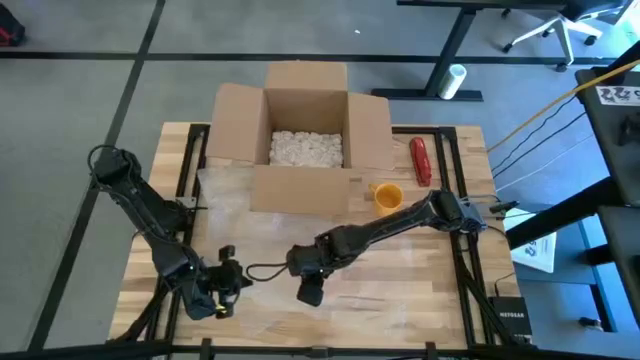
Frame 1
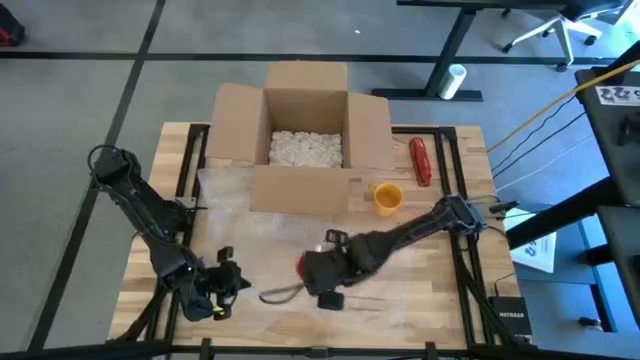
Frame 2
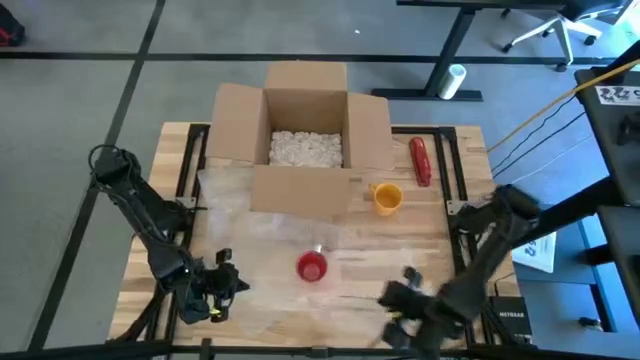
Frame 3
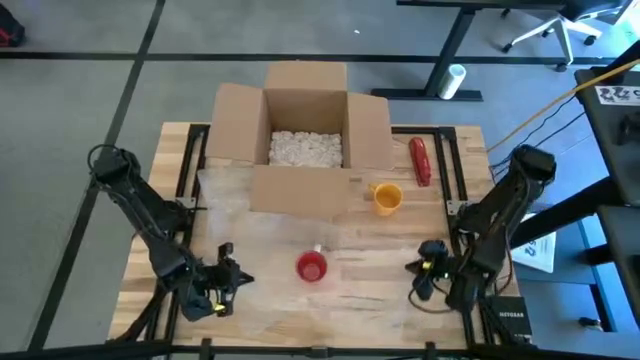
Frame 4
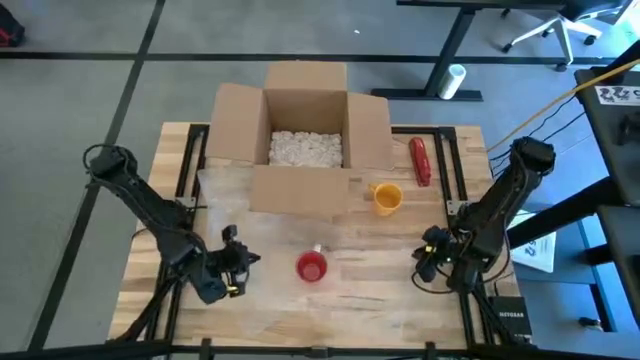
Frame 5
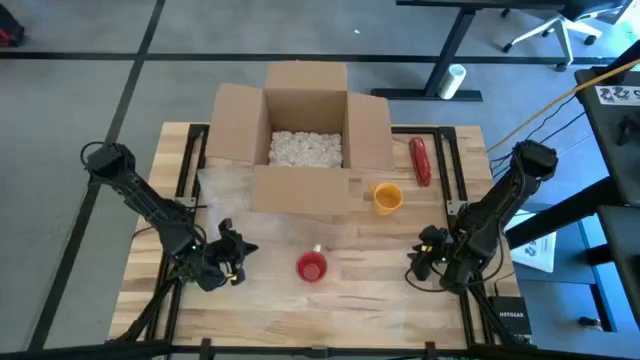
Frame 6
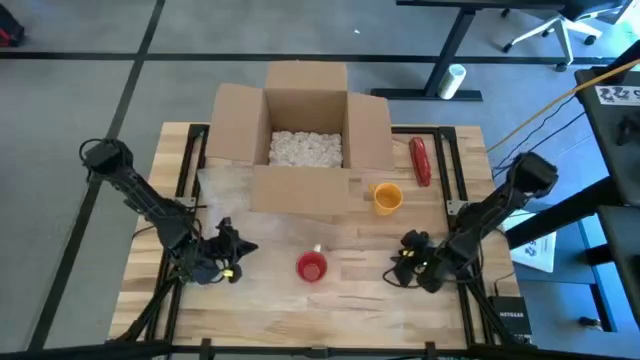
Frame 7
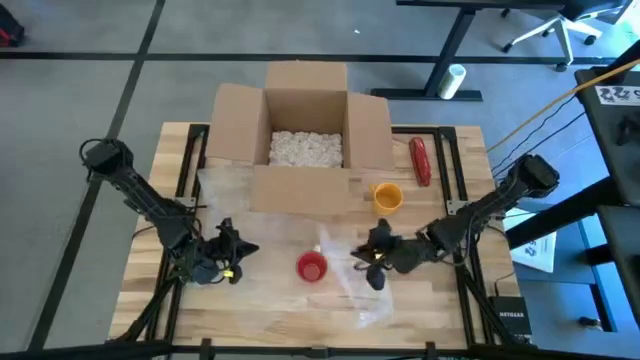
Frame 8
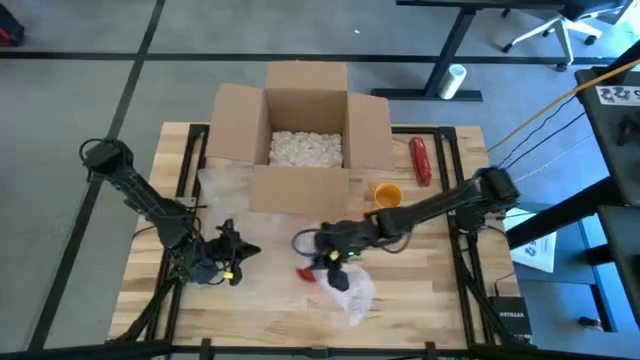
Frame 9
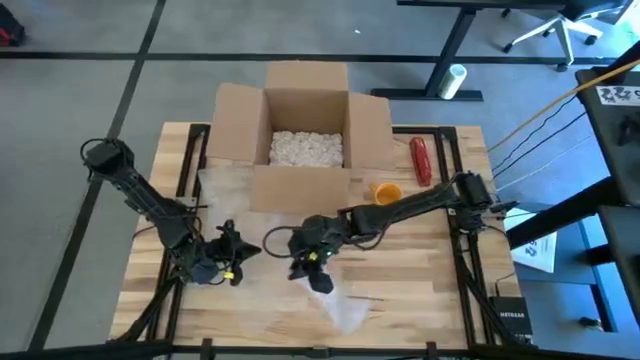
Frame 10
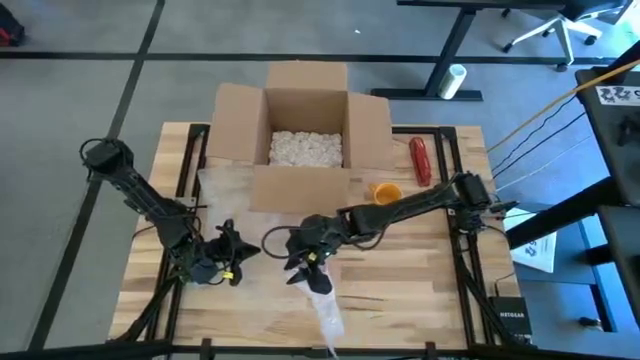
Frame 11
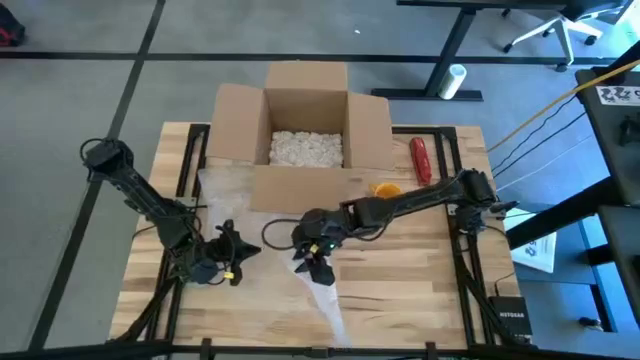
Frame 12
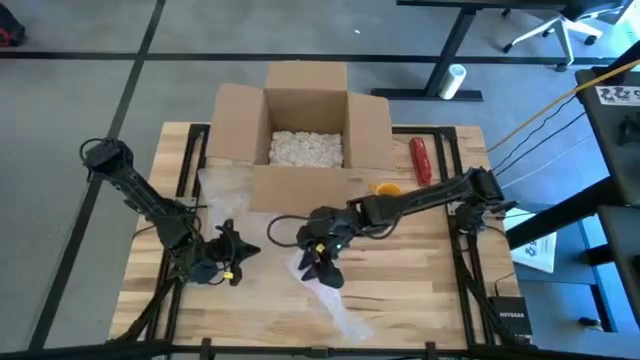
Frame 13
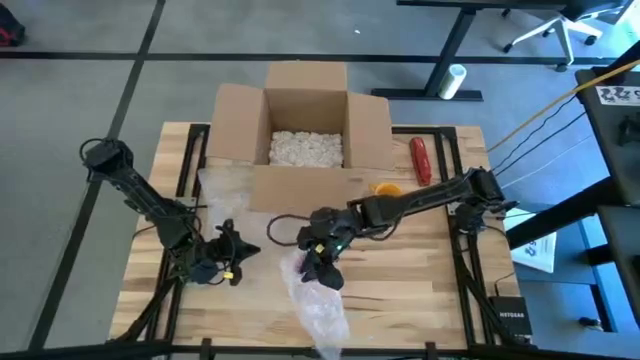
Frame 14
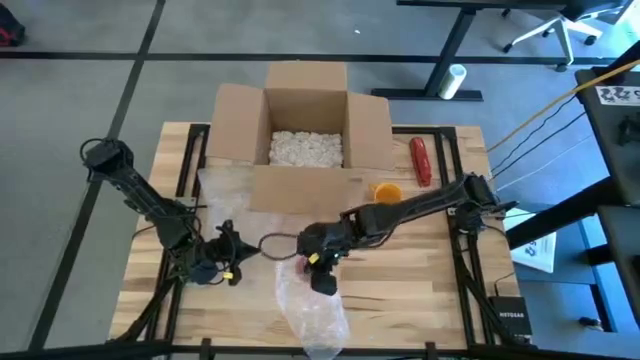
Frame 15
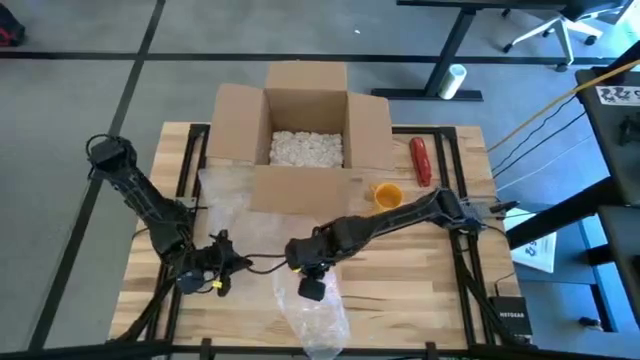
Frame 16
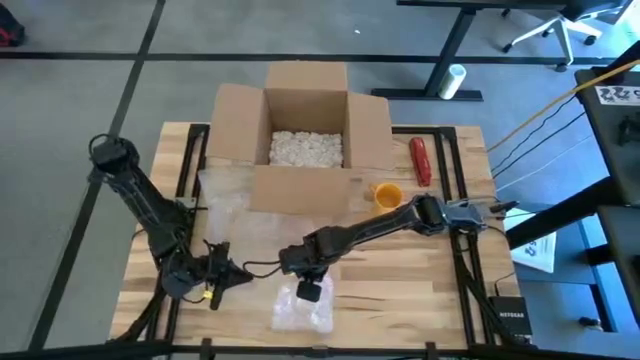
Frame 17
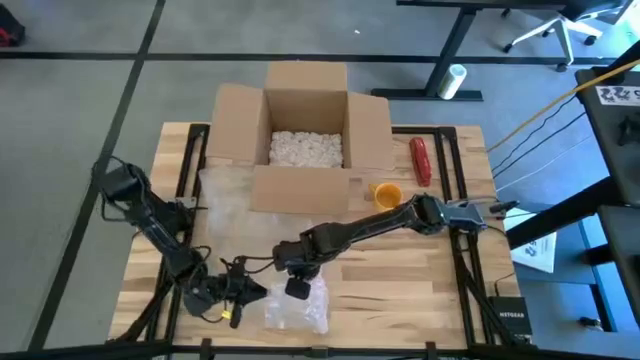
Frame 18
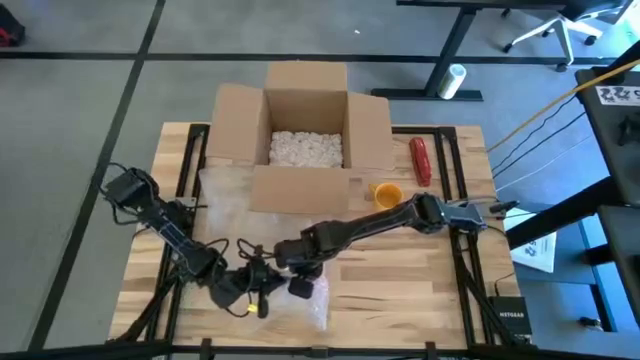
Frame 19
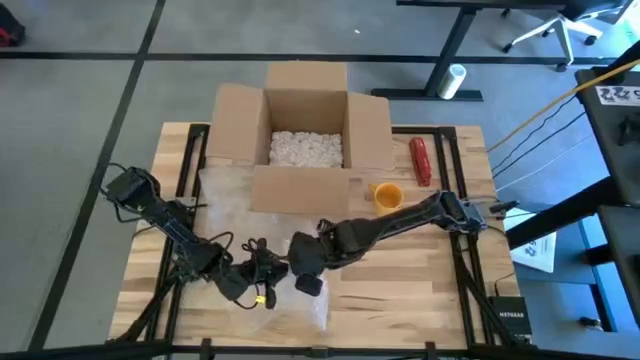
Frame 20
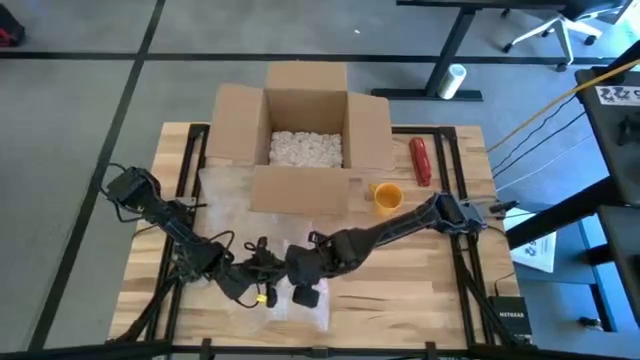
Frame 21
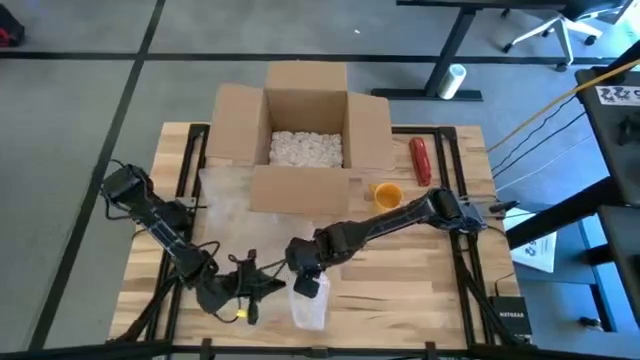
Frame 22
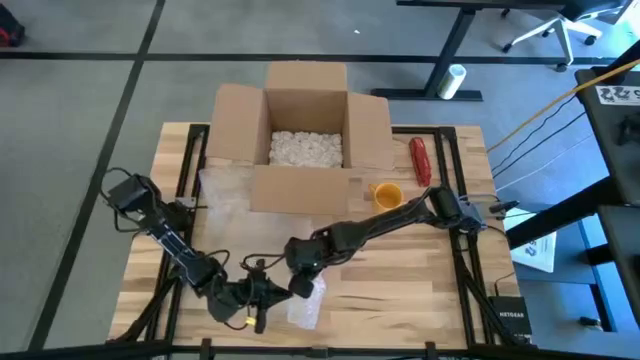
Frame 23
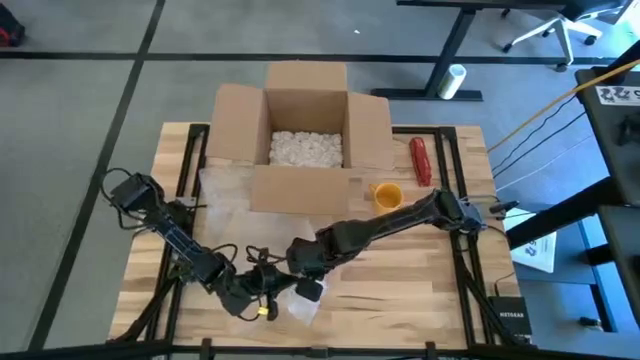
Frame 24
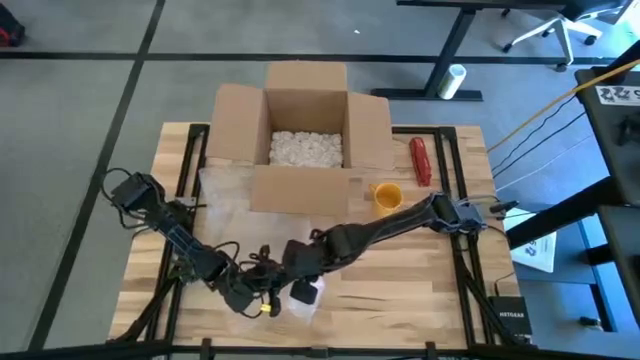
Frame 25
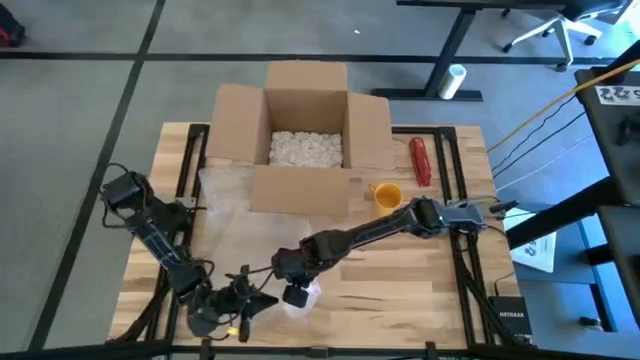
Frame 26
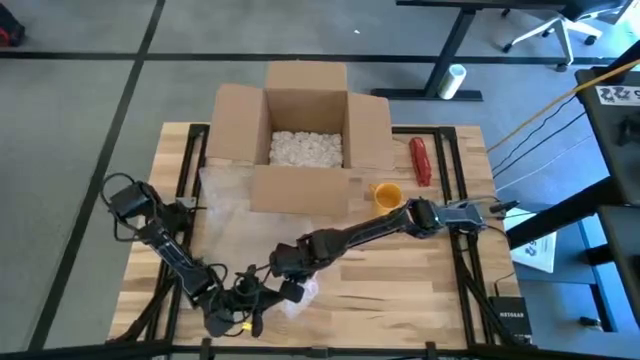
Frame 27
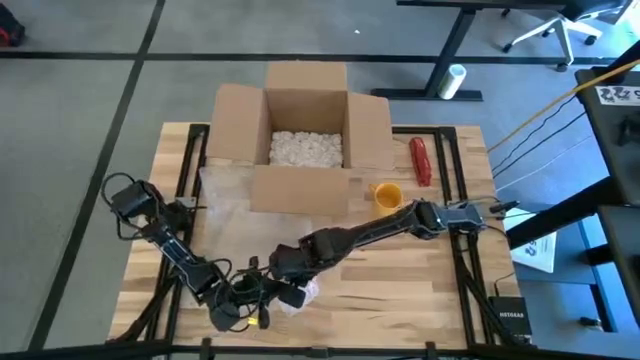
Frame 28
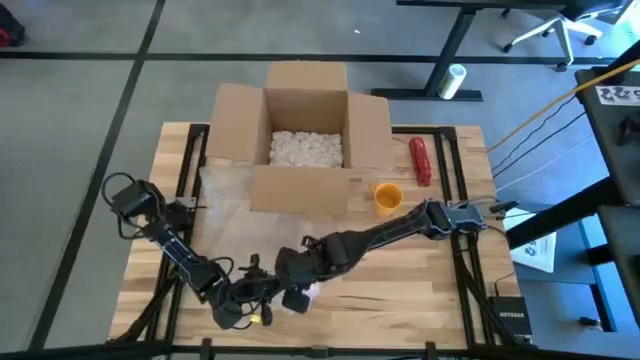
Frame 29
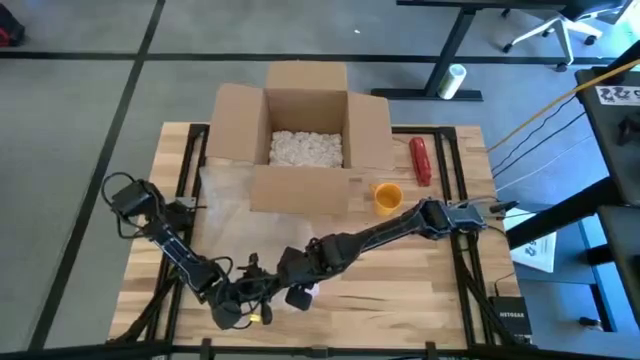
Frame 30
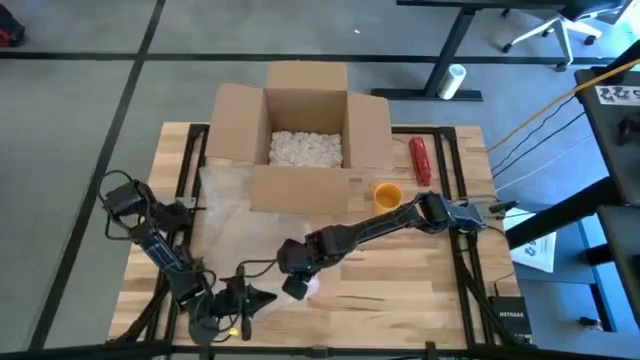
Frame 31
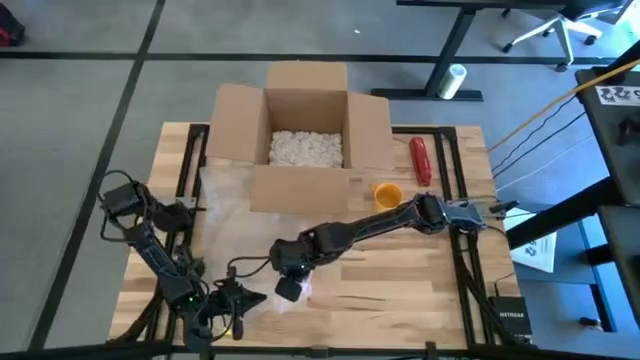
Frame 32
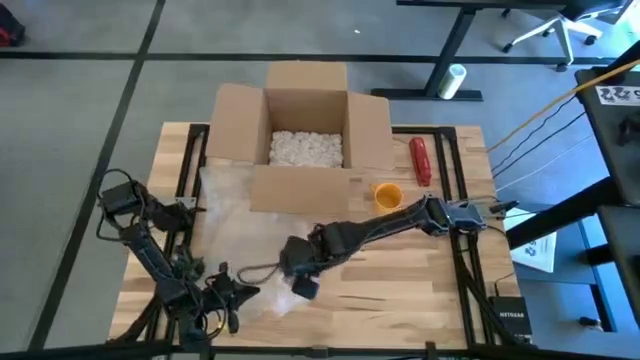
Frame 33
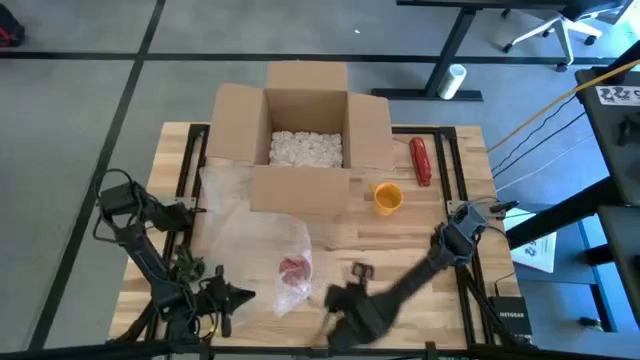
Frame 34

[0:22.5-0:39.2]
Task: wrap mug
Wrap the red mug with bubble wrap

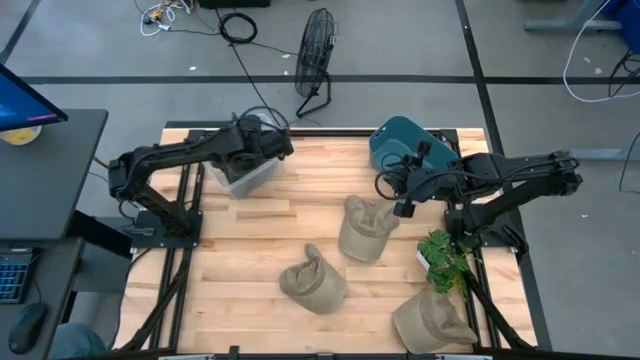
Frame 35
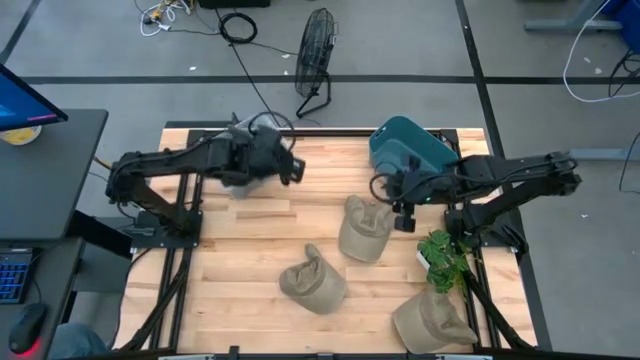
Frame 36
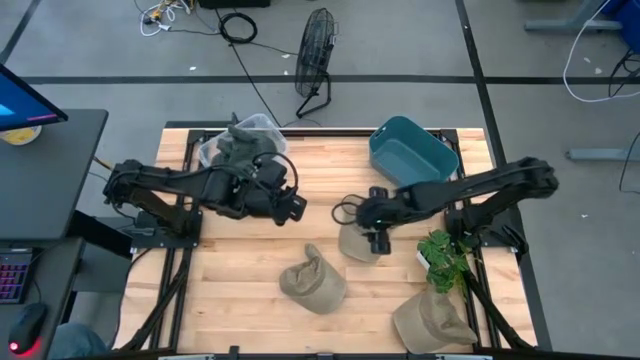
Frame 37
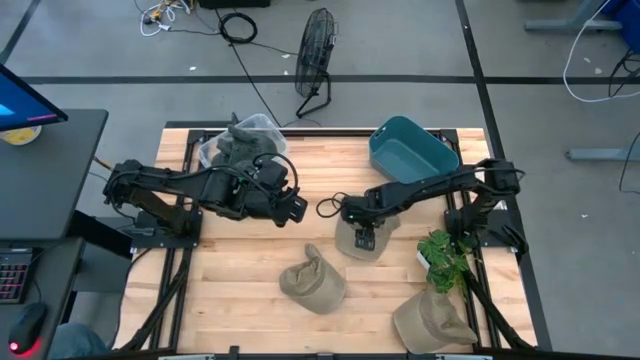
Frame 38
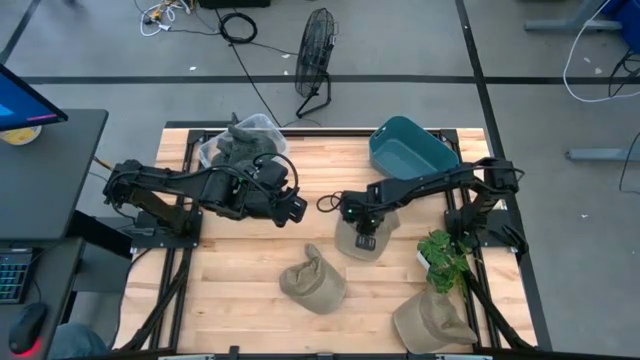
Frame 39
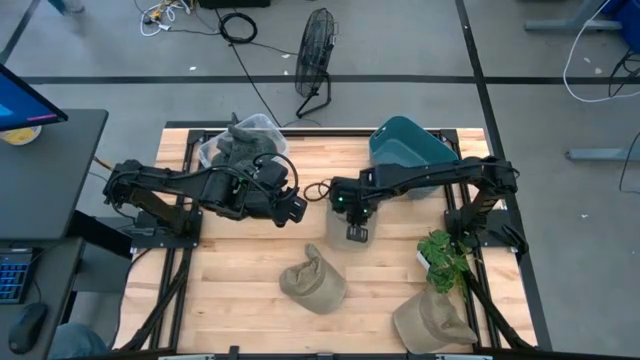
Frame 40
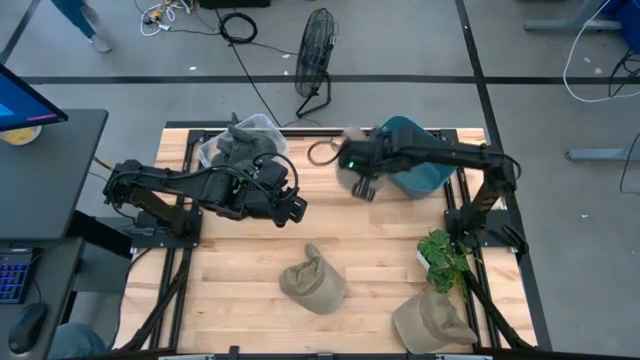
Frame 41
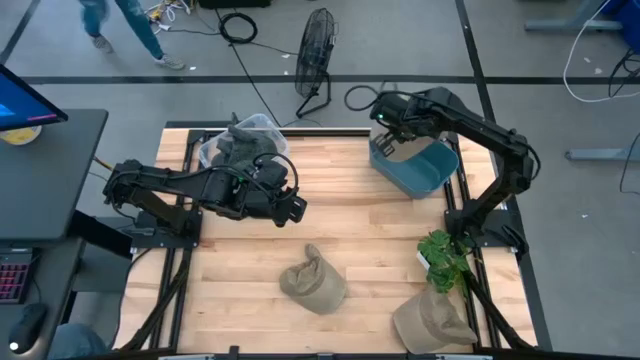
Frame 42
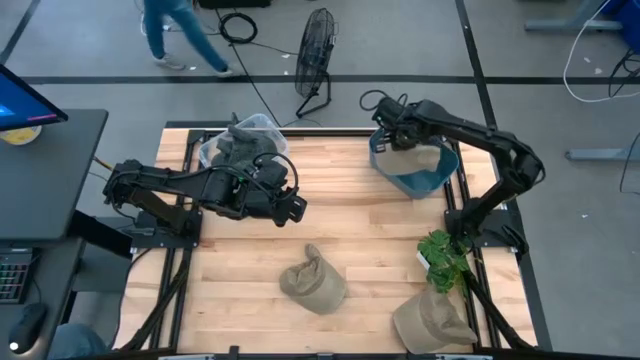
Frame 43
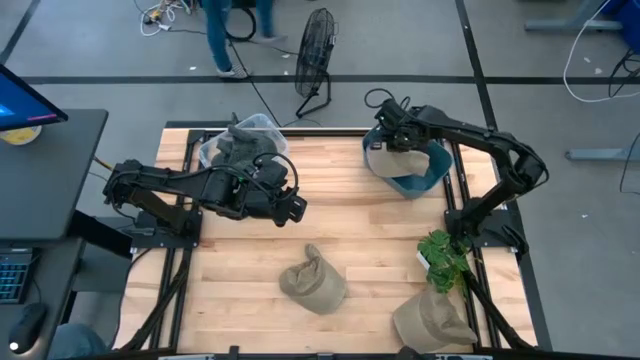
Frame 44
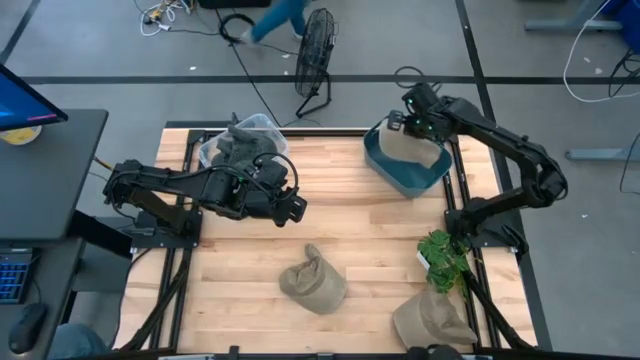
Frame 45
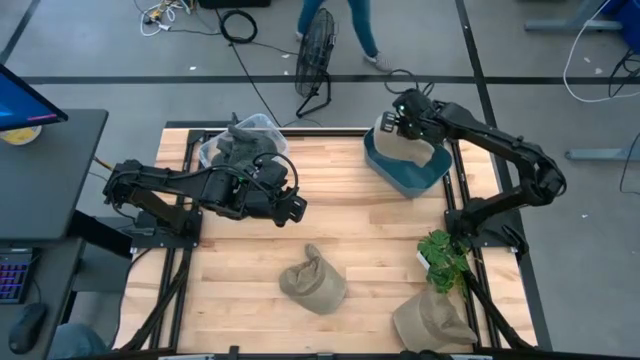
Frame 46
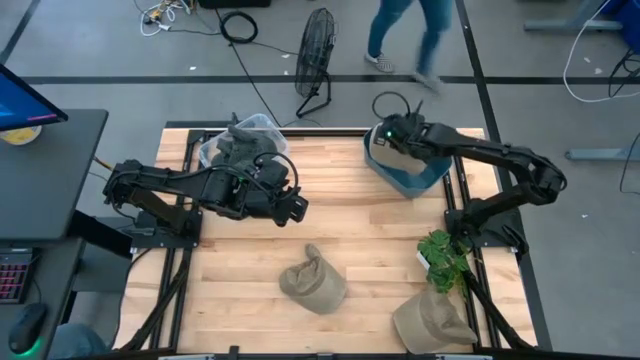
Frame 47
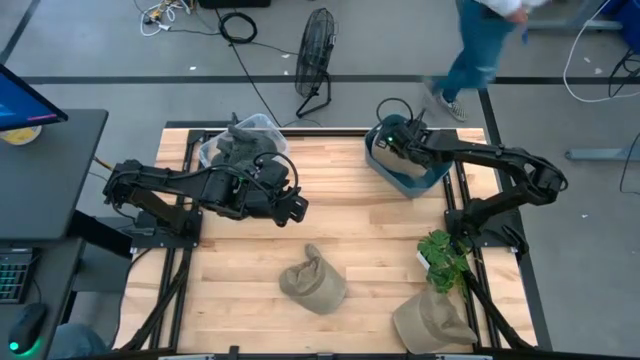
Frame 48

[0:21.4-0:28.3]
Task: Pick & Place hat
Put the top light brown cap into the blue bin
